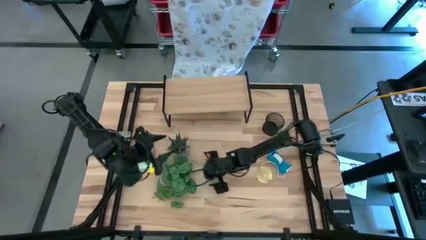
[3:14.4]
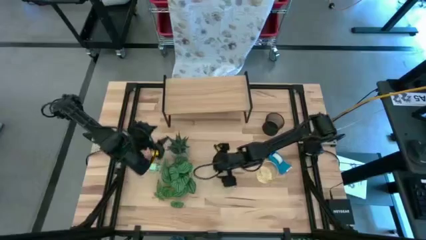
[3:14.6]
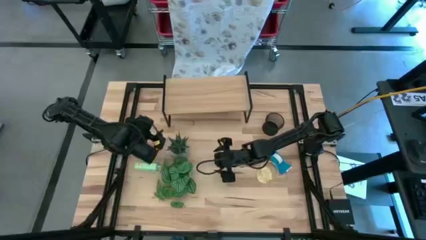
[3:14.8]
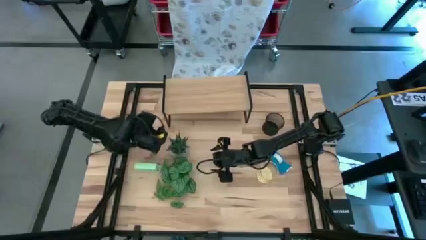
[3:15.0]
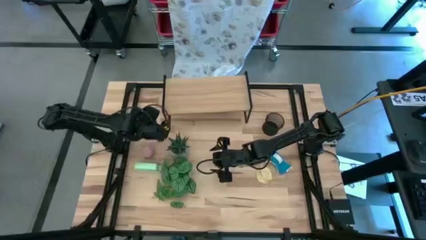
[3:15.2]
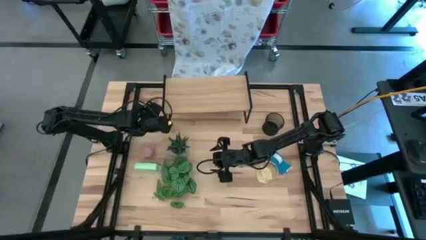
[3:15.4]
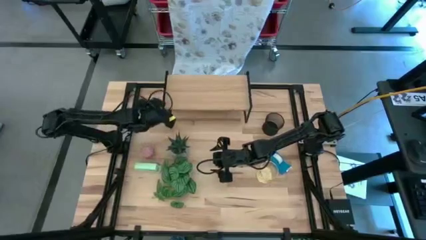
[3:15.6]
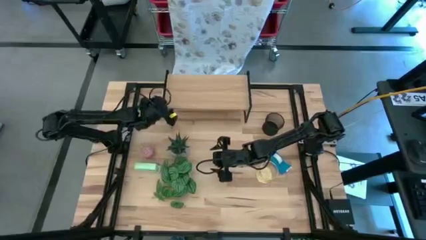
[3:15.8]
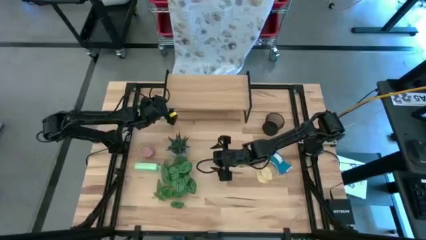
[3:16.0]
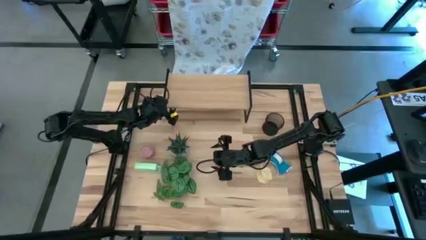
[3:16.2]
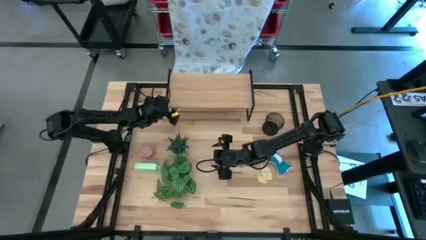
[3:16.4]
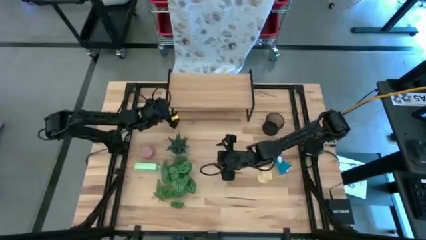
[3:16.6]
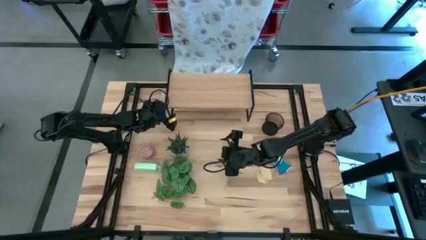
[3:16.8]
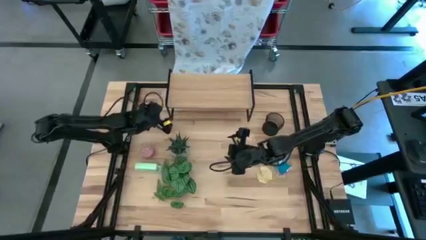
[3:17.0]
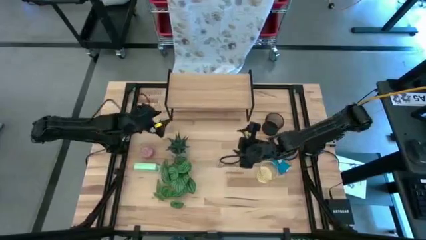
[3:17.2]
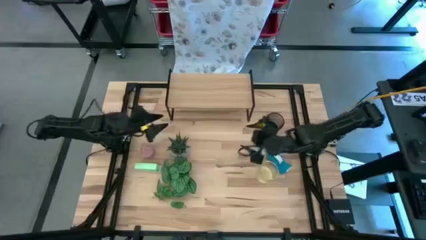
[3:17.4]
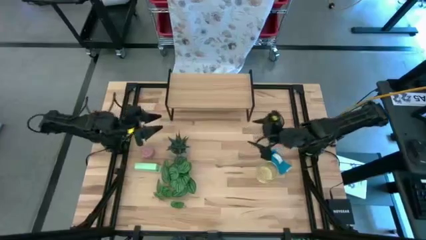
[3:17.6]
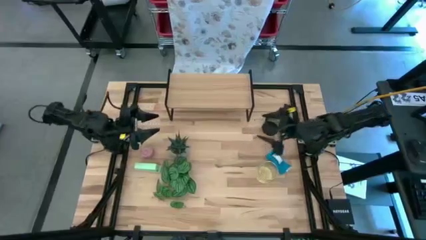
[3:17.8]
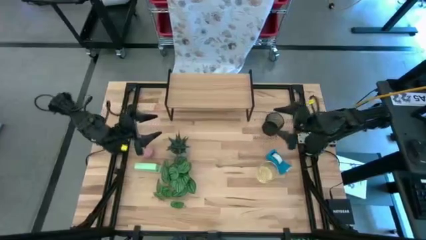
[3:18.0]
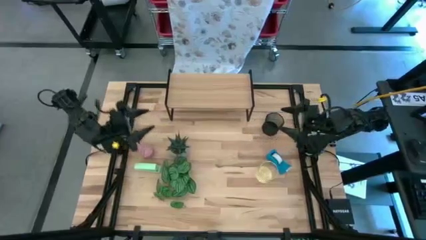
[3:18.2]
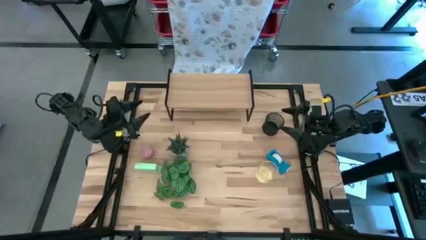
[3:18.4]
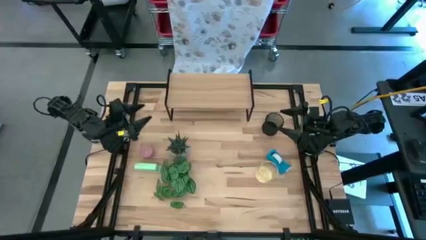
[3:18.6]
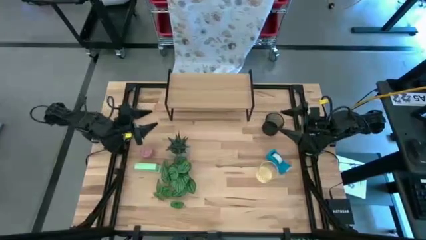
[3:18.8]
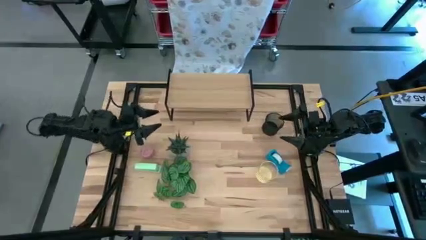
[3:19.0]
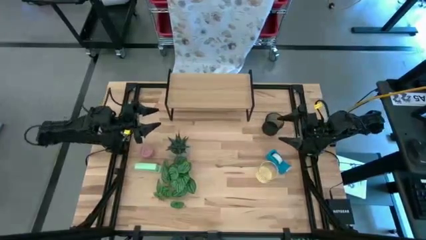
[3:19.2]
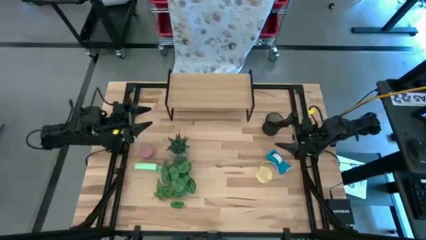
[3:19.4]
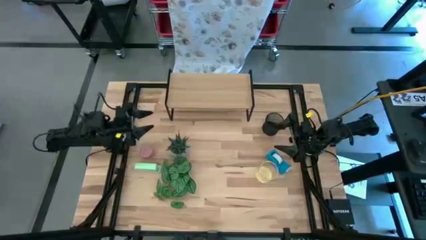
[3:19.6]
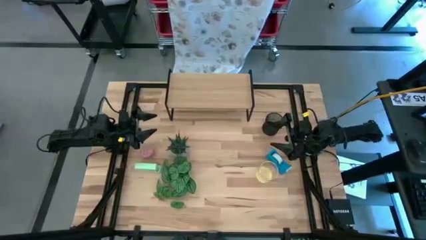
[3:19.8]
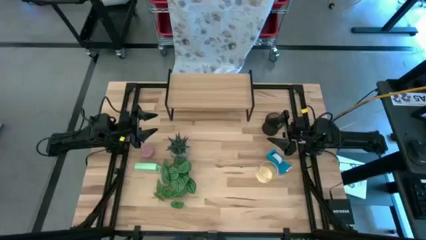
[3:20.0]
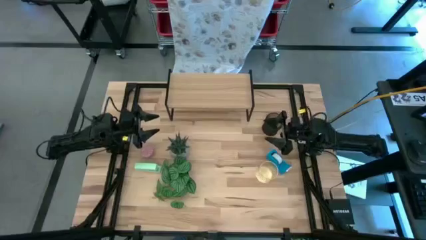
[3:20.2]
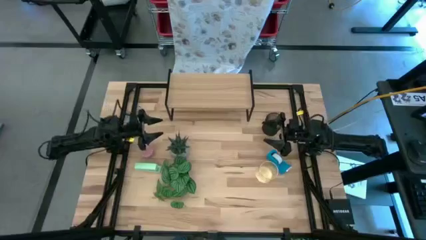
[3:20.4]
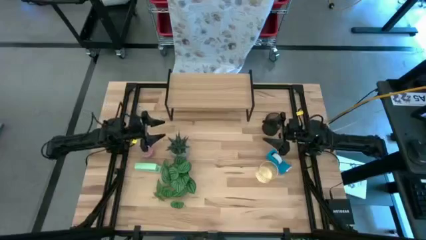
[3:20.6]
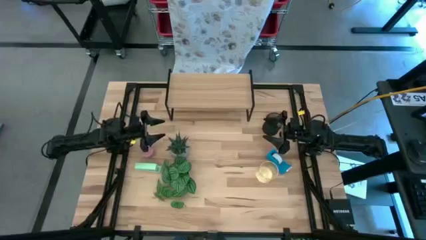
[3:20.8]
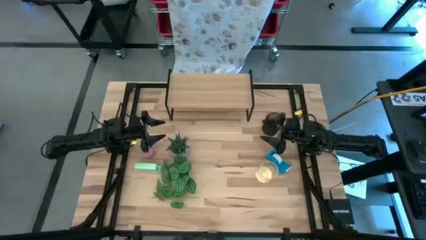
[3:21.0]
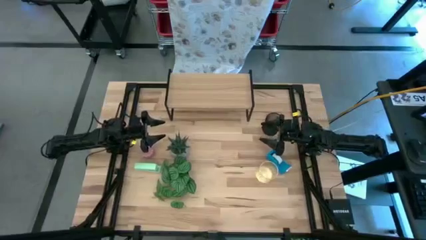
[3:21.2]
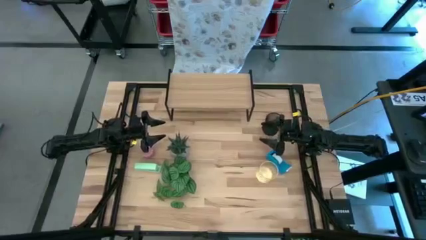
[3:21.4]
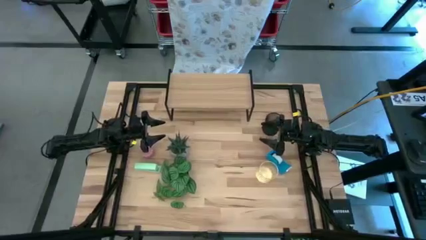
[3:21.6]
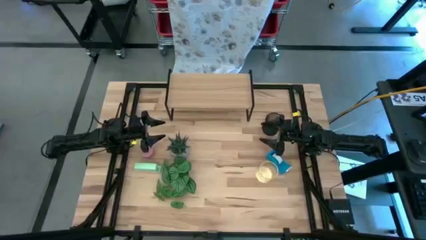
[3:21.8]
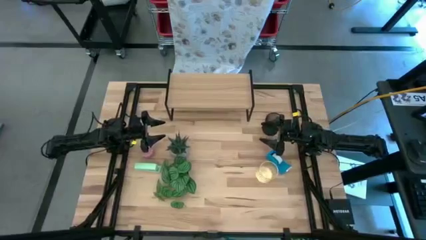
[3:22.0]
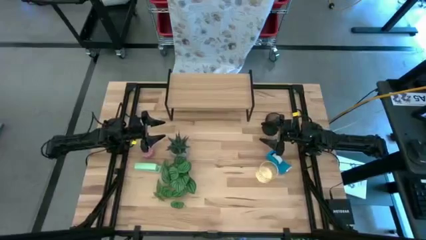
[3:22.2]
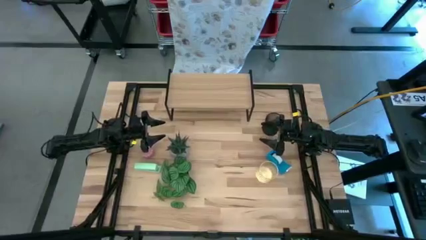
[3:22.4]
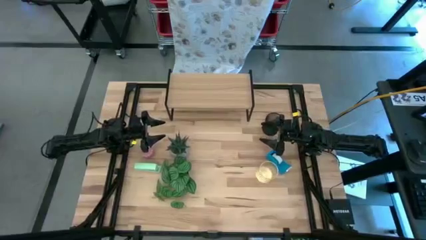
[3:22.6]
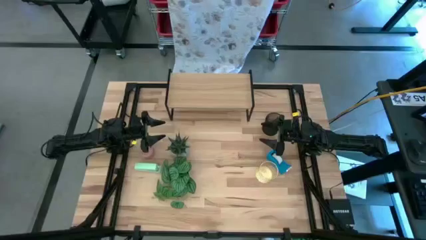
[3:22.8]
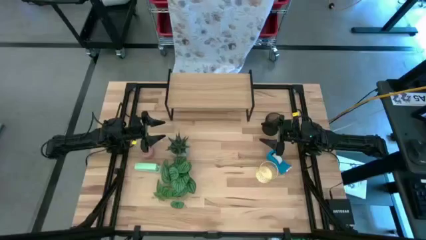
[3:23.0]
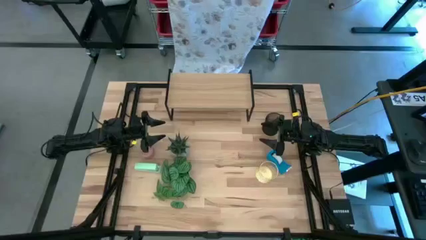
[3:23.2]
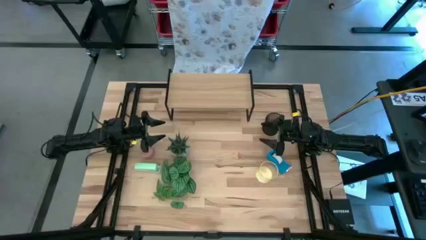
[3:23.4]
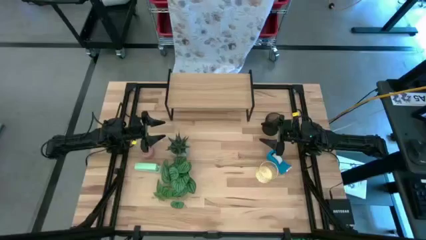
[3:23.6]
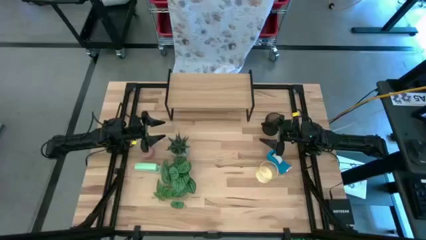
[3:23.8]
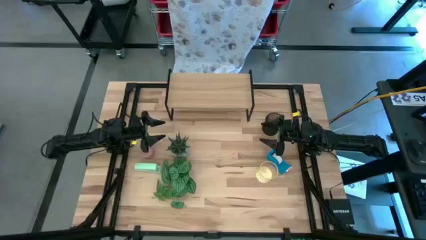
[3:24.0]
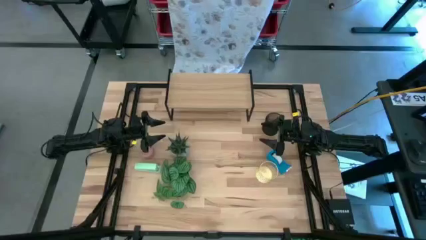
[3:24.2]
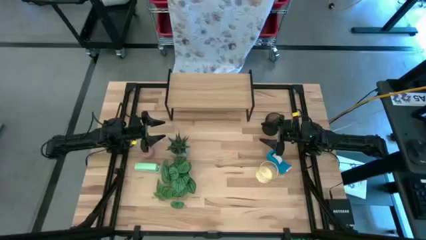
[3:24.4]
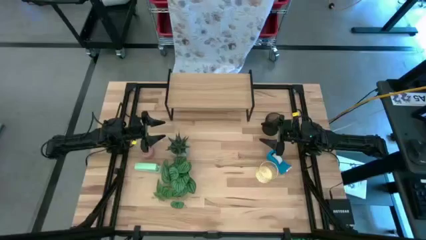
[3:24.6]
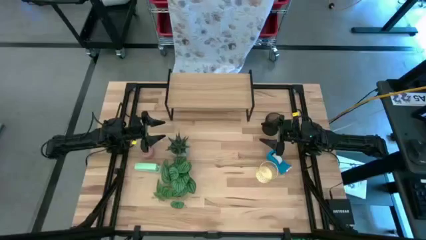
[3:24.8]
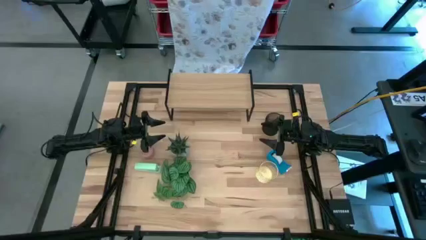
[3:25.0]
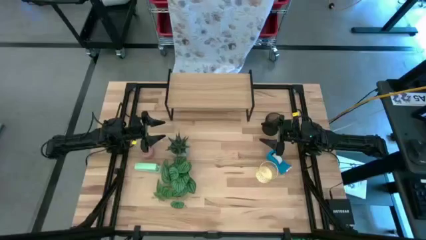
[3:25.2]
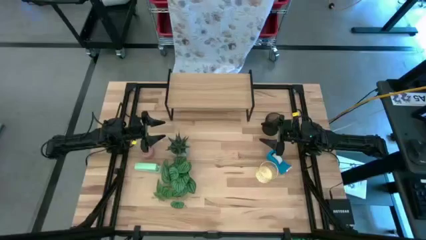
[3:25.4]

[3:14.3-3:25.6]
Task: Stock shelves
Return to Home Position

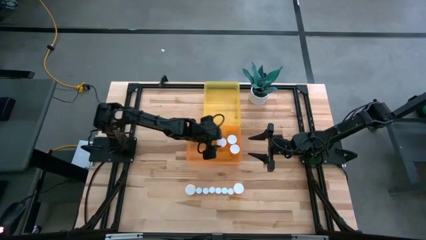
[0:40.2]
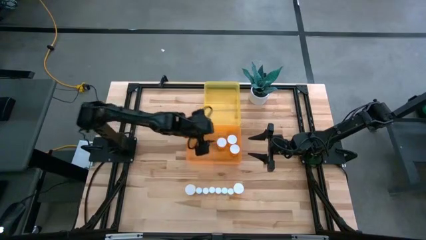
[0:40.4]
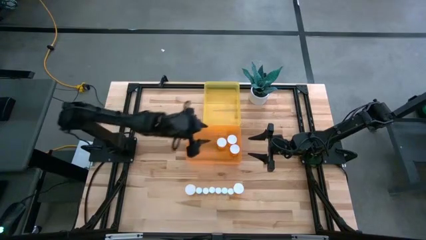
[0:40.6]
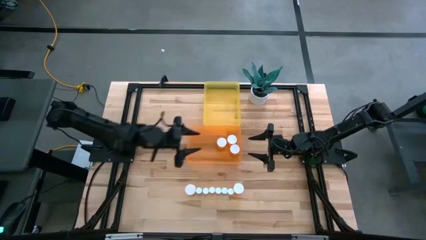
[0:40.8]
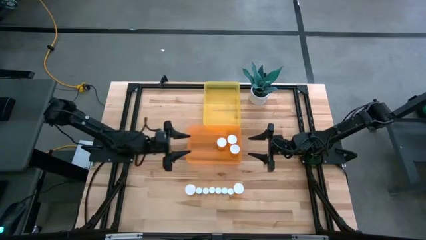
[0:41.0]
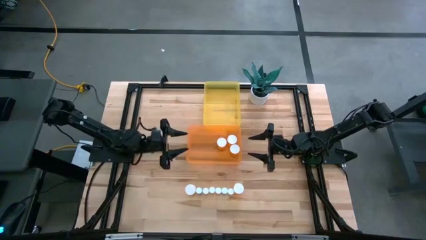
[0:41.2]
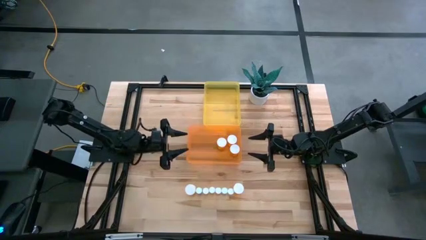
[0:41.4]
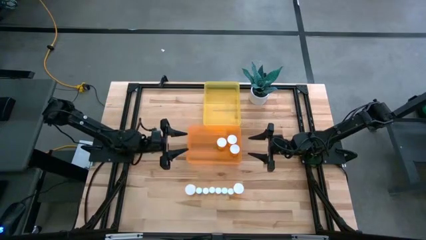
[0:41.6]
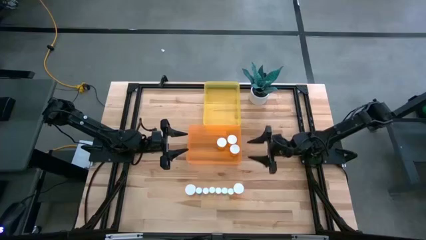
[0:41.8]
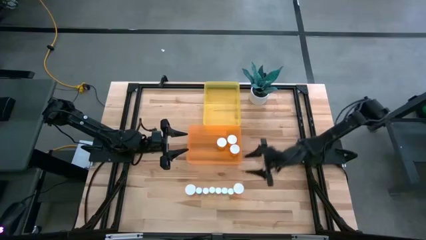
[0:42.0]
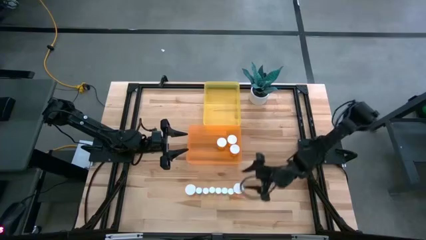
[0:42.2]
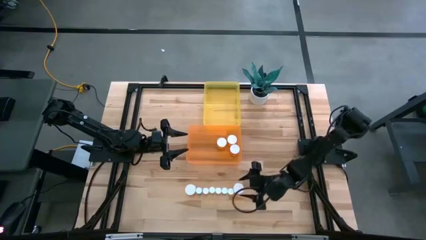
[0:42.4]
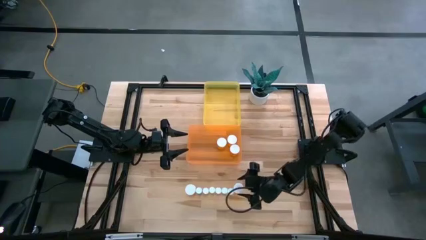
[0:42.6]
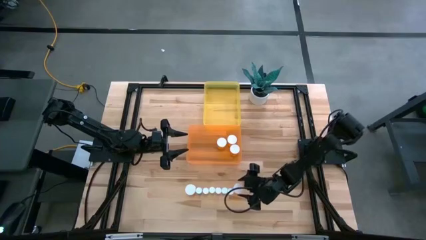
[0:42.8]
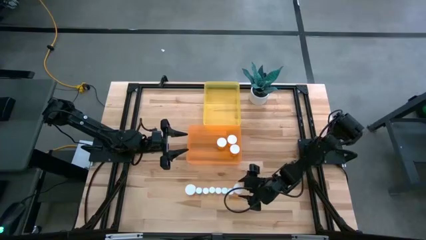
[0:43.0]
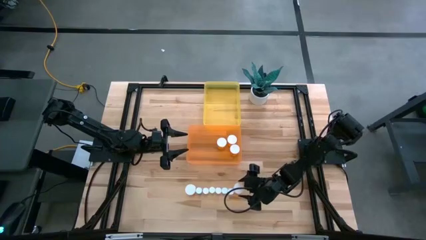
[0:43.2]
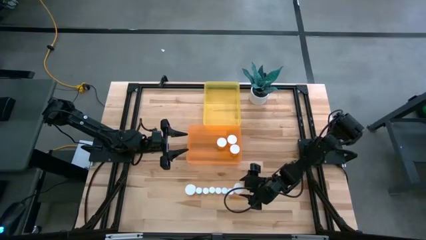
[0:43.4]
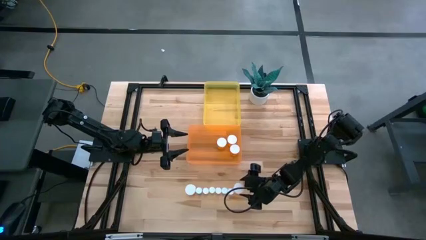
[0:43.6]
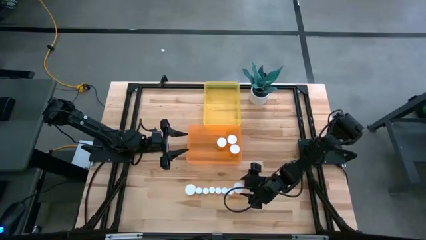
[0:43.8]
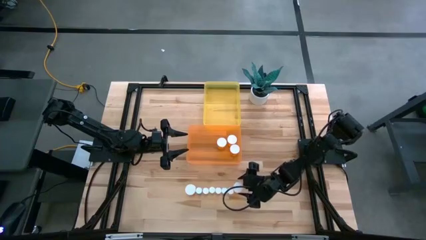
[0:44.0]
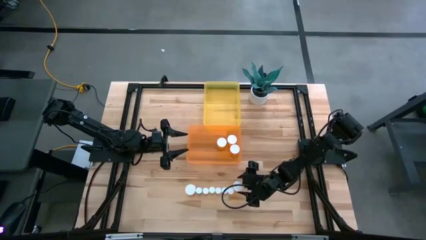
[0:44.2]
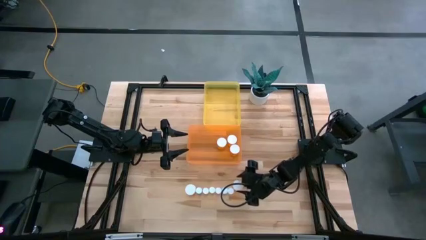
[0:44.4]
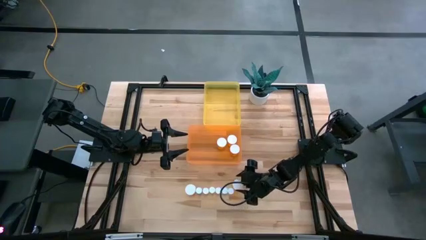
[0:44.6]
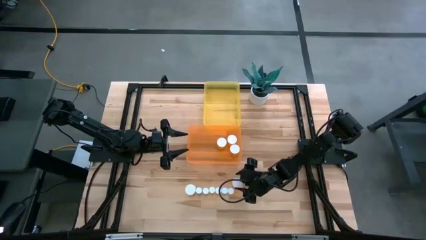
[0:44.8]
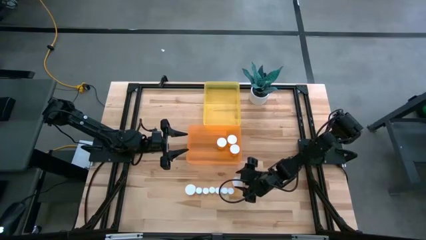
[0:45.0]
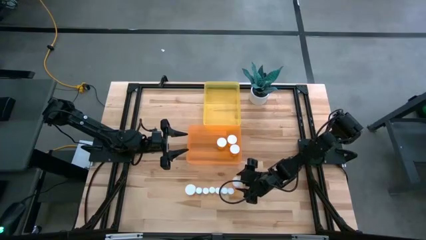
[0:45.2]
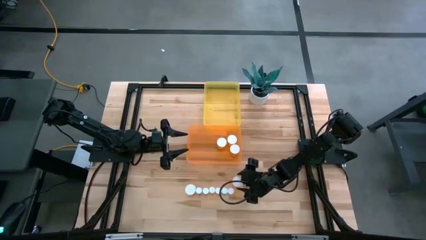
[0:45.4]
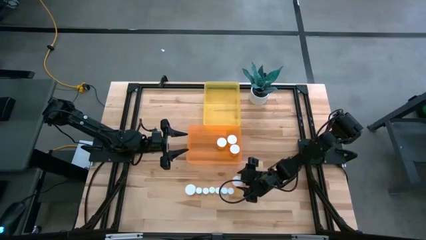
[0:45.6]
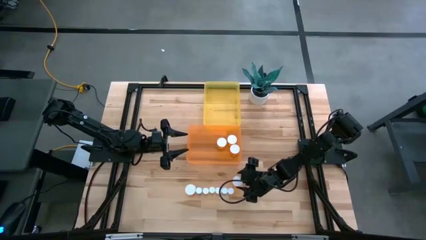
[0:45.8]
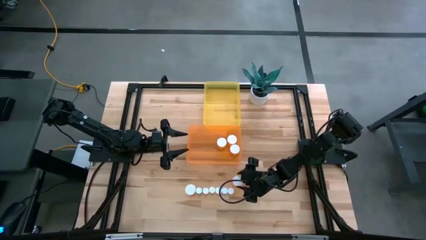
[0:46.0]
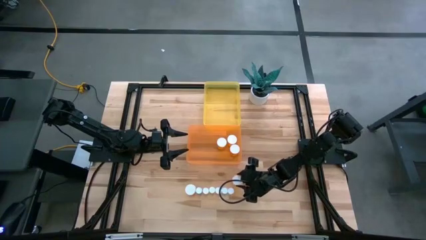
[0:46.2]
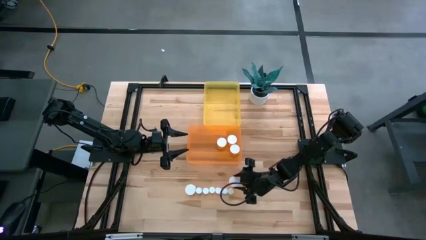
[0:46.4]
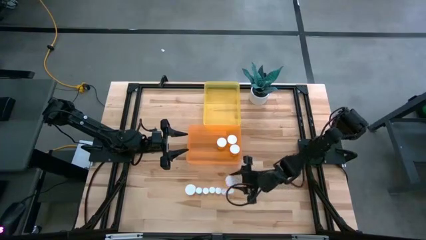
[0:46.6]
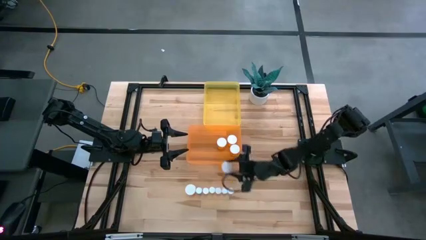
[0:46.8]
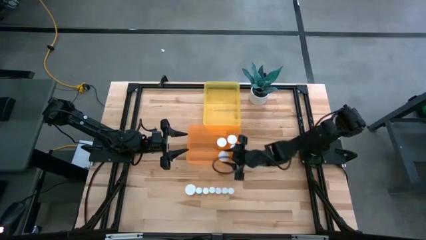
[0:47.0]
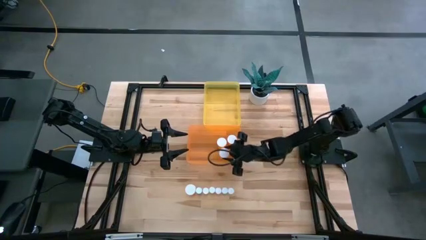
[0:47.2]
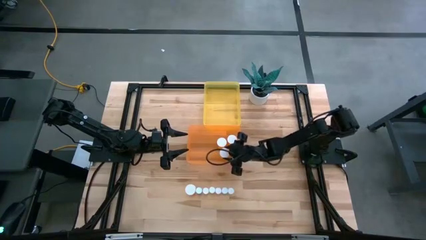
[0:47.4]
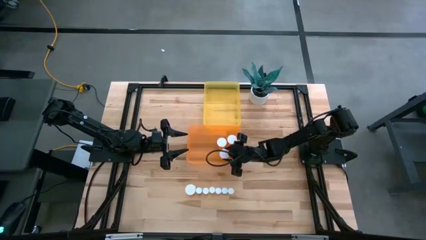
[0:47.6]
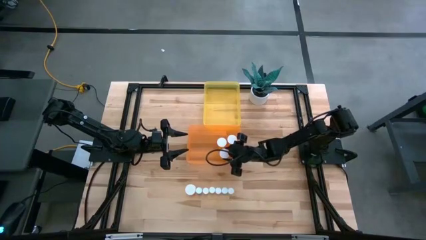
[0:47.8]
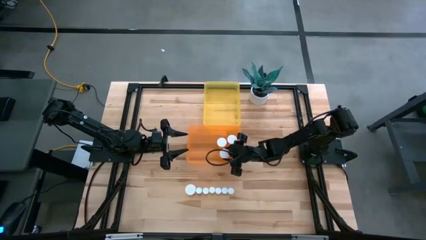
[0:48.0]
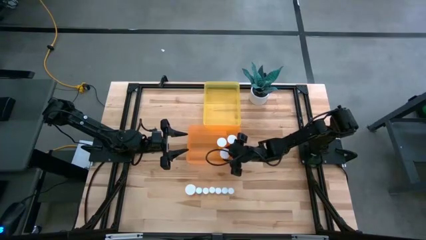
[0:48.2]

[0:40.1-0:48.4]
Task: Pick and place medicine bottles into bin by pill shape (circle, oval)
Put the big orange pill bottle into the orange bin
